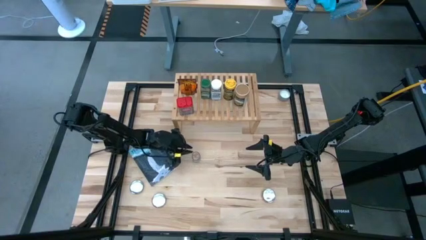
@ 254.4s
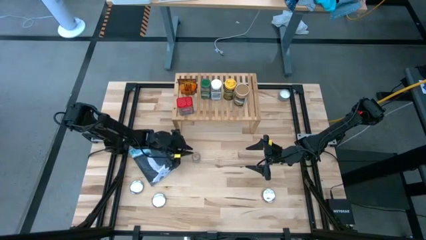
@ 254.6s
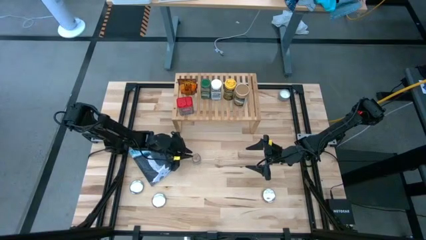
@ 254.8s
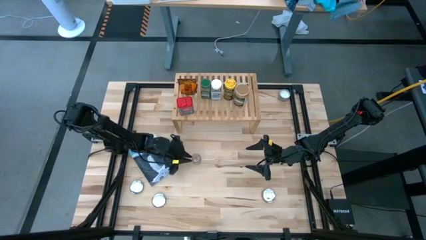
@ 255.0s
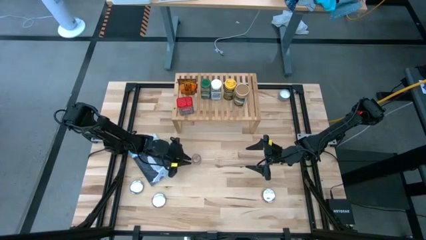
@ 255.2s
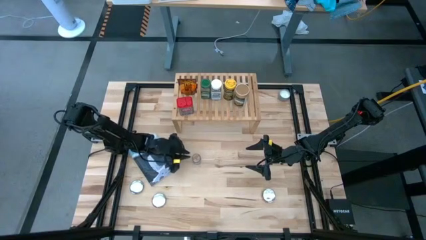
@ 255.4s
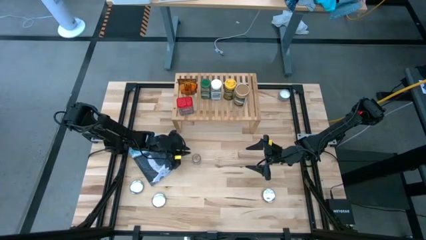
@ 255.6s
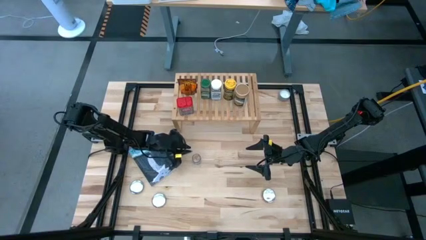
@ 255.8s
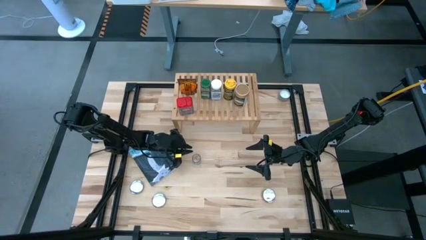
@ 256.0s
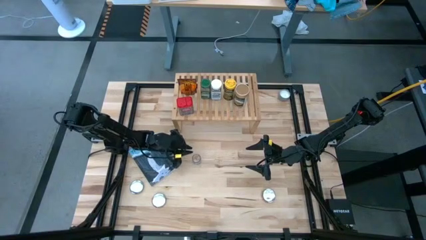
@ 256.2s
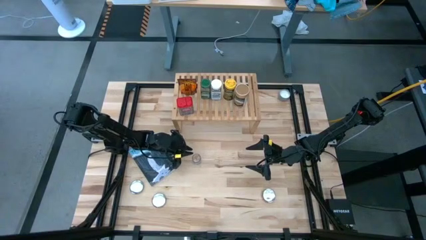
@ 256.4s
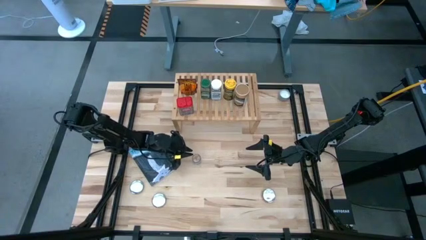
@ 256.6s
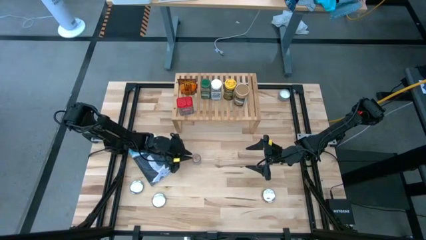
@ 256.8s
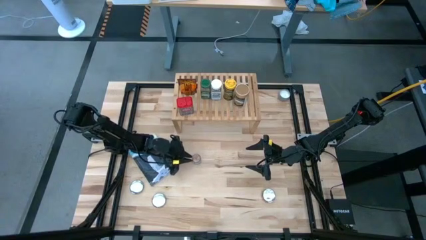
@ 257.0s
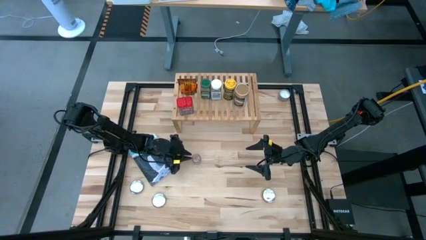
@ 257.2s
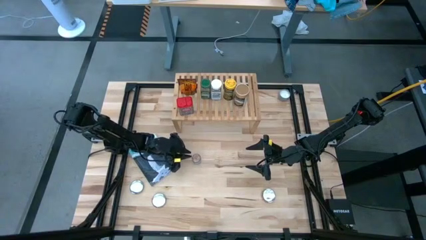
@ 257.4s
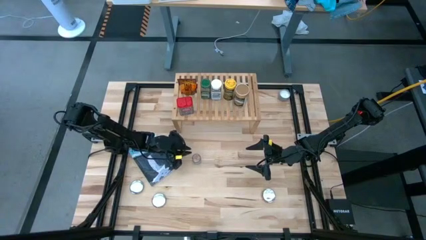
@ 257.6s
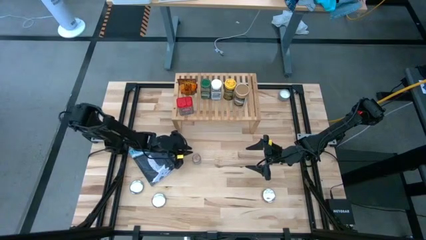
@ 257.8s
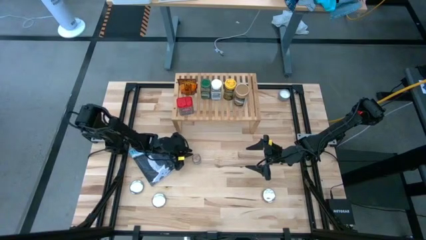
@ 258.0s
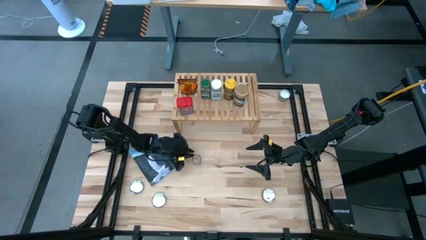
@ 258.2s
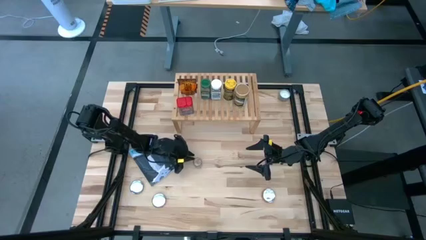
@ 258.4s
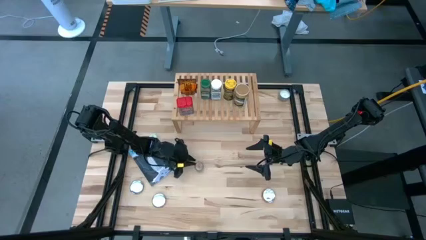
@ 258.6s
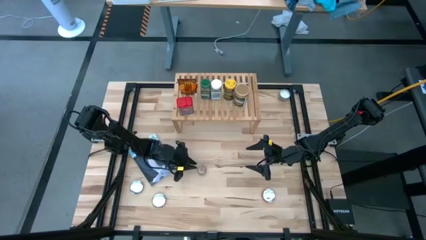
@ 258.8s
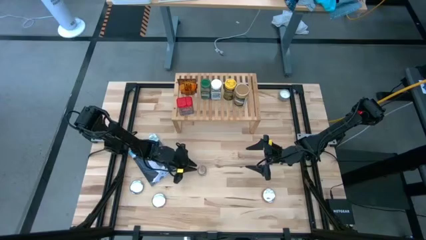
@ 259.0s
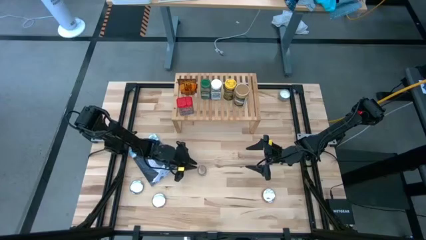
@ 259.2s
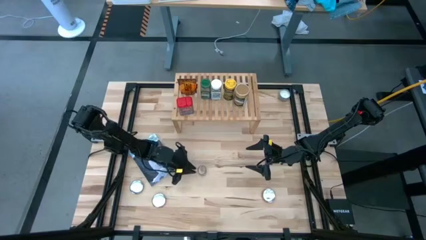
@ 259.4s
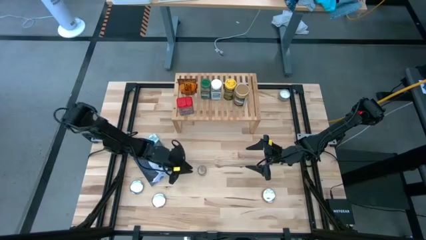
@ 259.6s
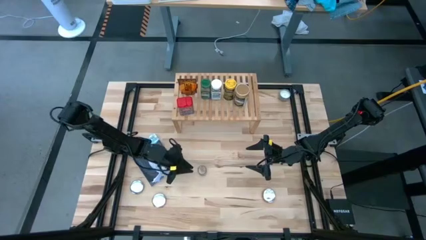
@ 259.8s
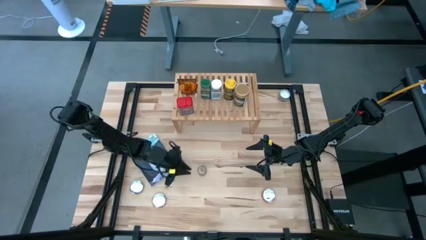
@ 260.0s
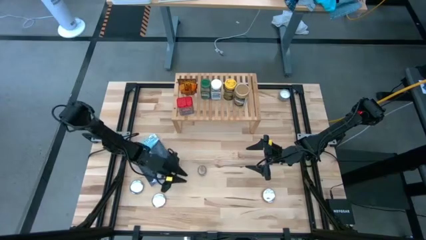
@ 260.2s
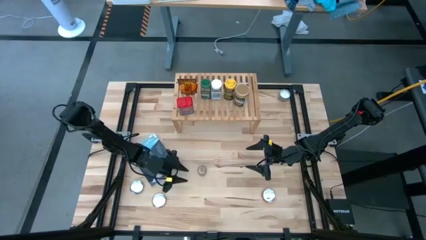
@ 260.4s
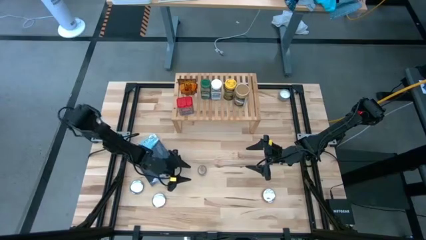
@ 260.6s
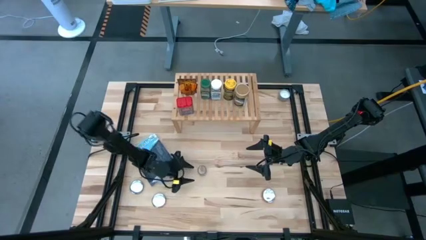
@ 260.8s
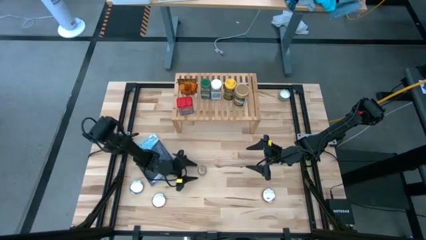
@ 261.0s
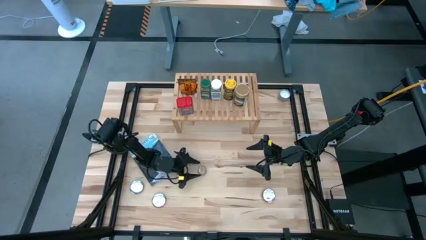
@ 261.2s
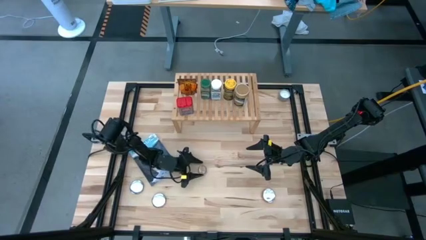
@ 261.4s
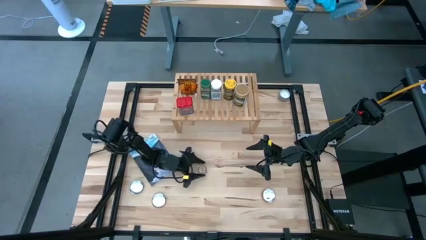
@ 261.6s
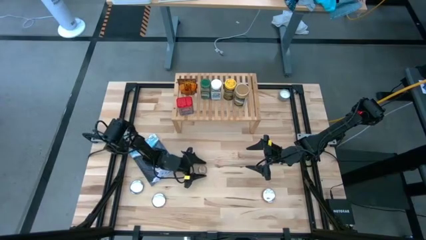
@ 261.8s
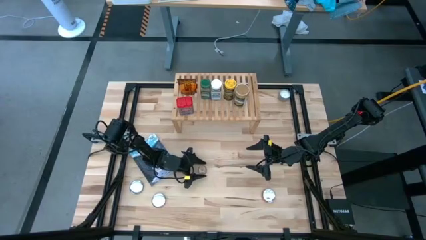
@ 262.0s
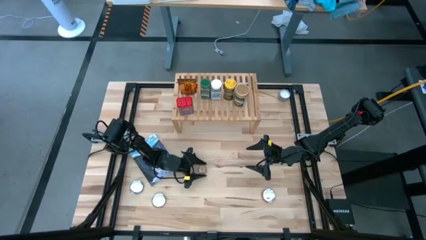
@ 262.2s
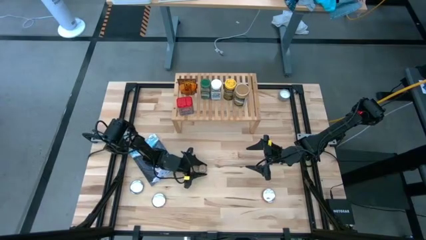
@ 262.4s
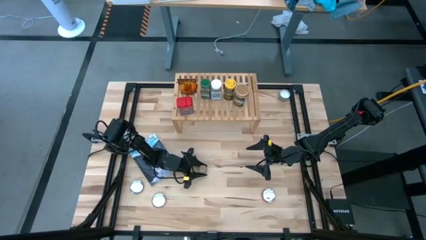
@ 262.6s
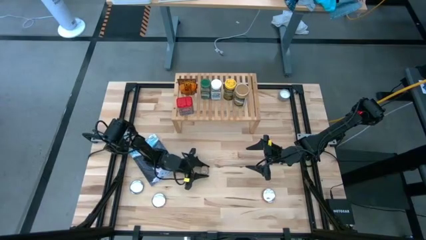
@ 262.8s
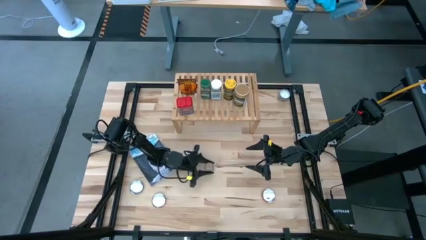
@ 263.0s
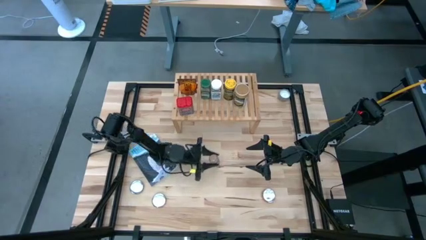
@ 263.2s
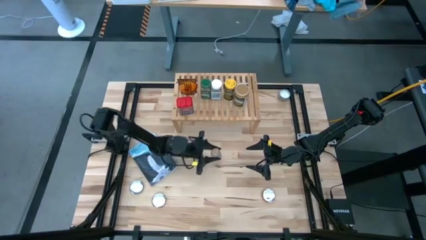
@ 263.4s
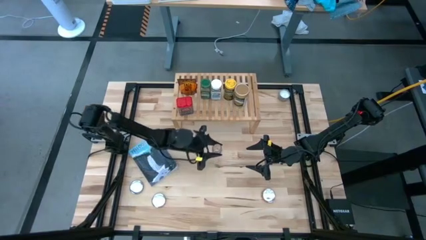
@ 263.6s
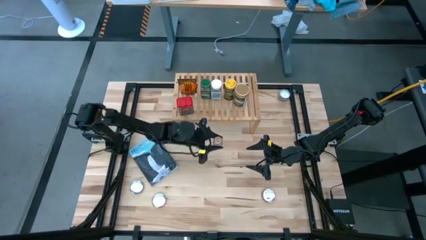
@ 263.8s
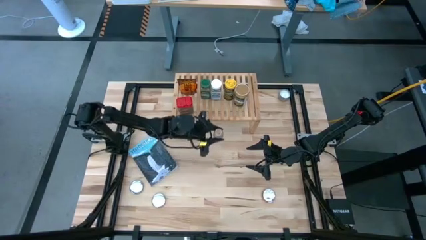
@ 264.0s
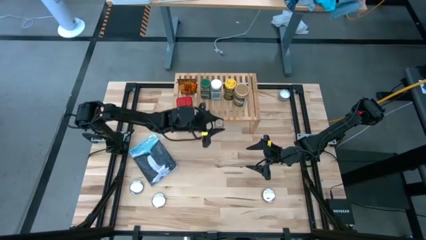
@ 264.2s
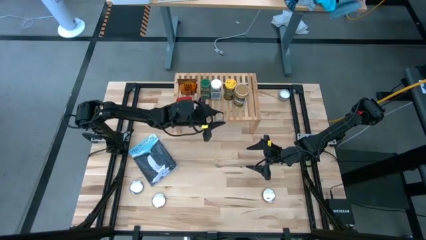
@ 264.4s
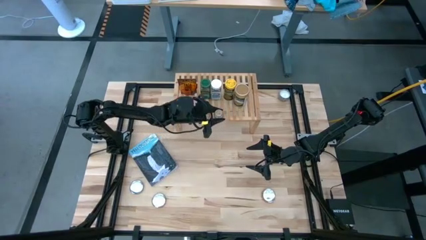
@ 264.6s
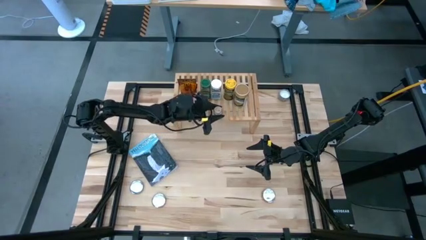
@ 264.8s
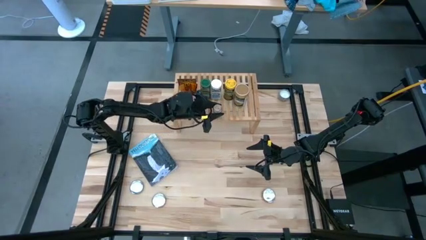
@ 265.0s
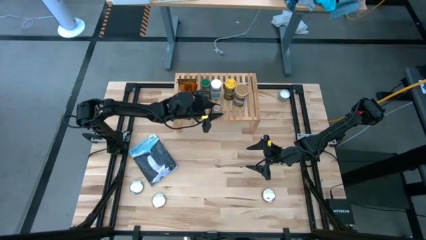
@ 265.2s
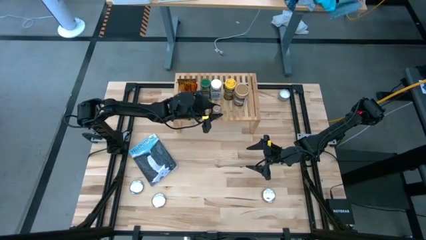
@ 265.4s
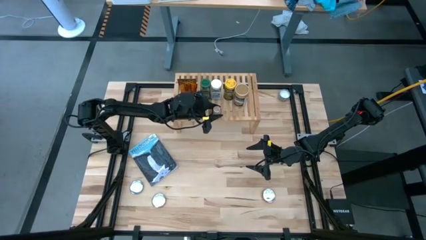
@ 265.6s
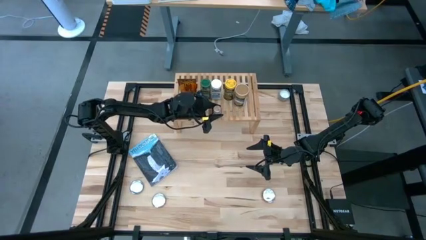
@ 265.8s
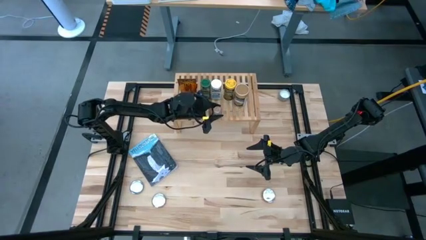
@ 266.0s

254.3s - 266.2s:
Task: Shelf spices
Put the transparent seasoning bottle on the shelf

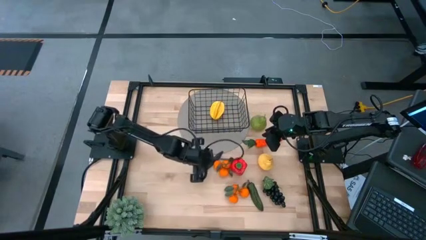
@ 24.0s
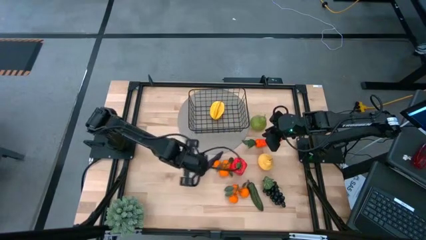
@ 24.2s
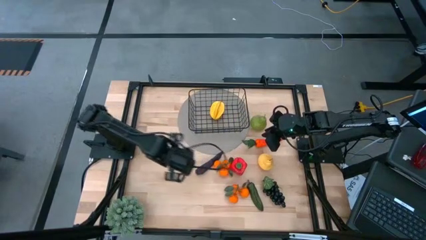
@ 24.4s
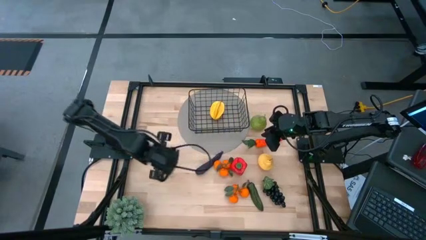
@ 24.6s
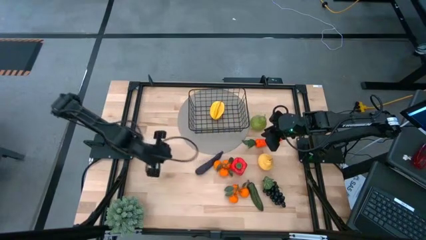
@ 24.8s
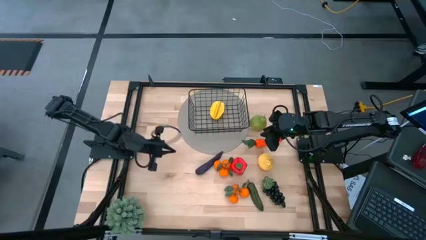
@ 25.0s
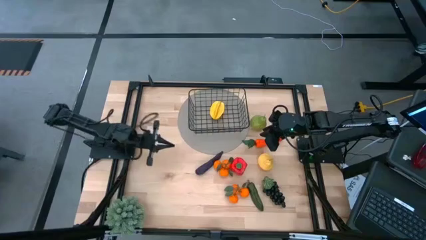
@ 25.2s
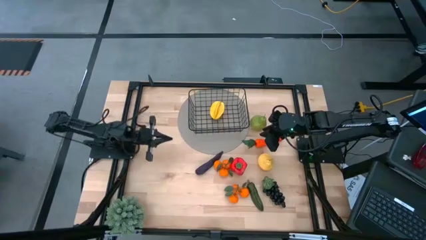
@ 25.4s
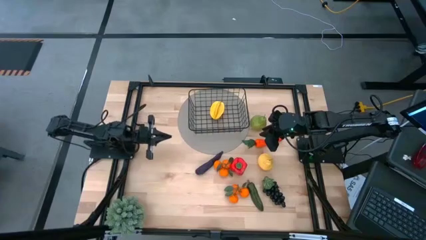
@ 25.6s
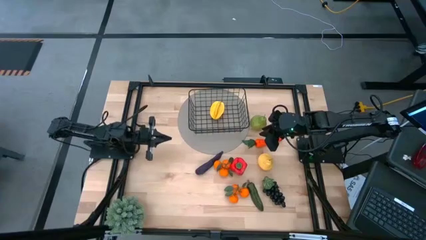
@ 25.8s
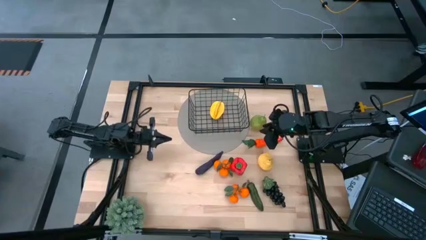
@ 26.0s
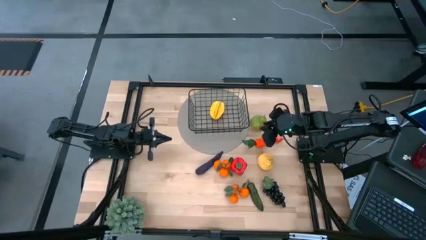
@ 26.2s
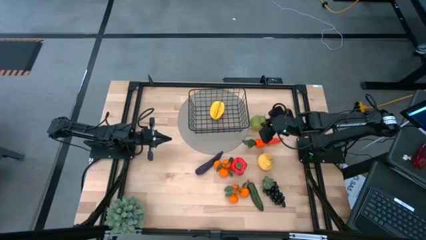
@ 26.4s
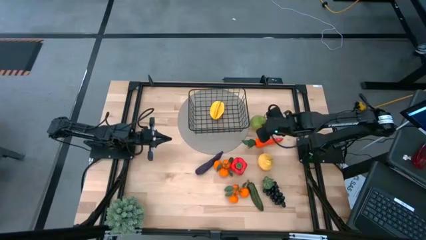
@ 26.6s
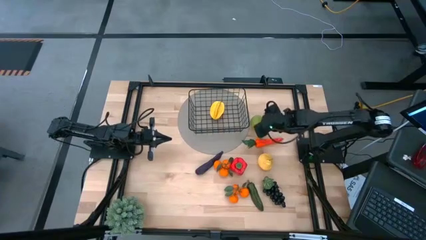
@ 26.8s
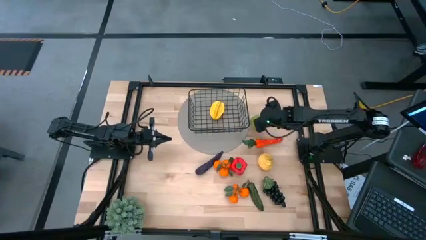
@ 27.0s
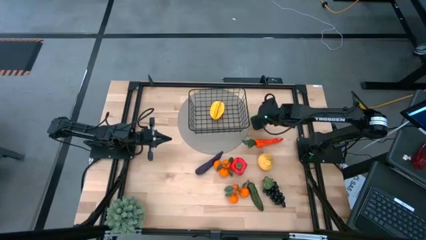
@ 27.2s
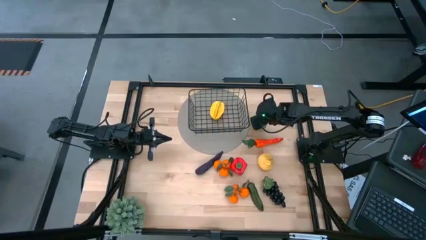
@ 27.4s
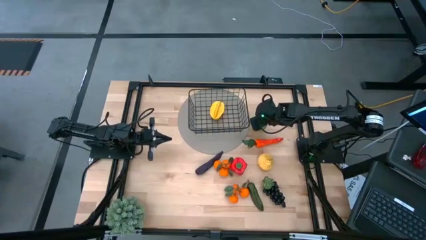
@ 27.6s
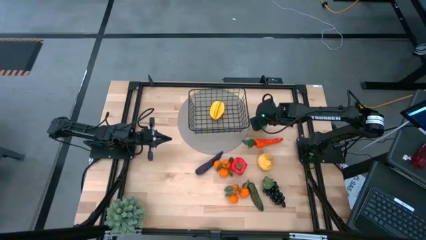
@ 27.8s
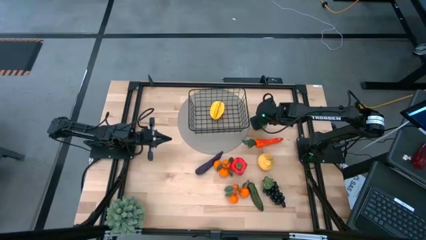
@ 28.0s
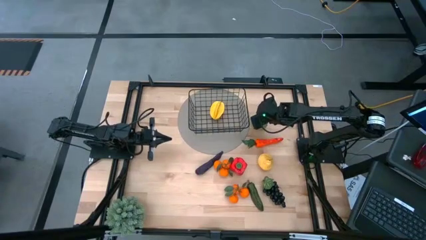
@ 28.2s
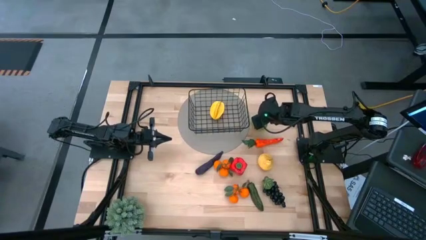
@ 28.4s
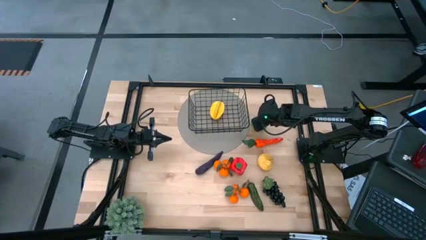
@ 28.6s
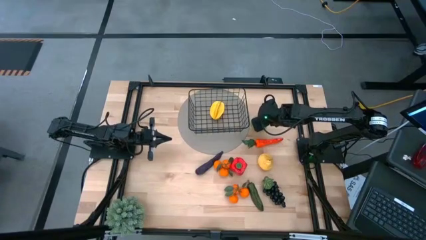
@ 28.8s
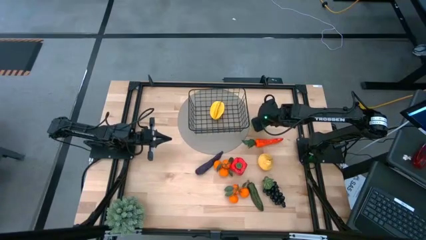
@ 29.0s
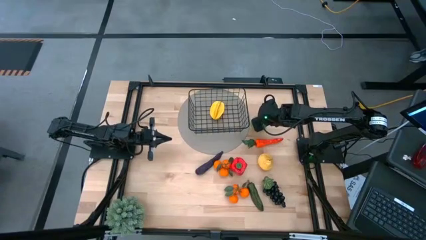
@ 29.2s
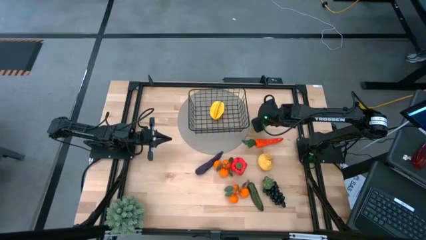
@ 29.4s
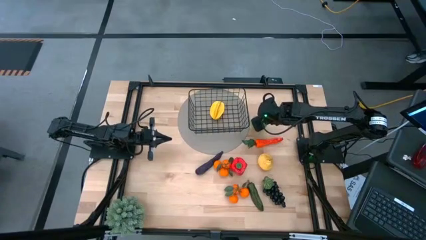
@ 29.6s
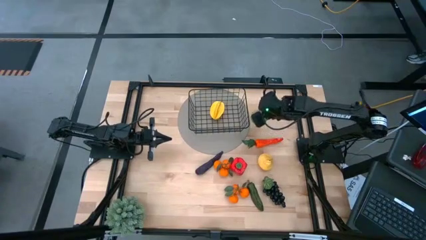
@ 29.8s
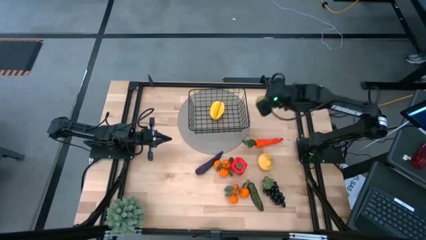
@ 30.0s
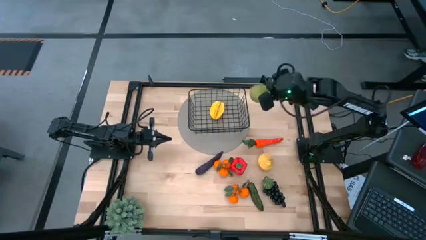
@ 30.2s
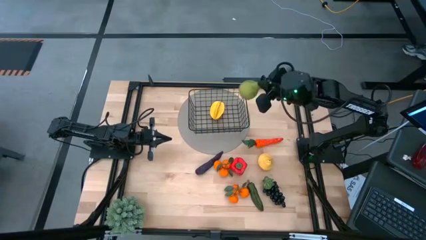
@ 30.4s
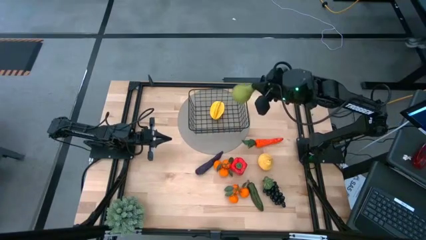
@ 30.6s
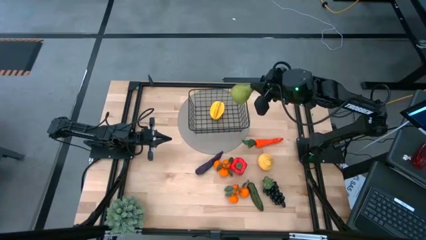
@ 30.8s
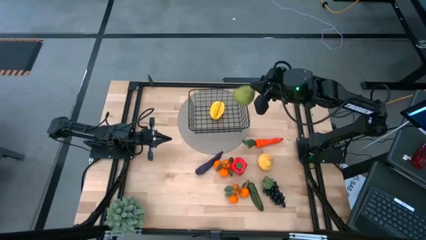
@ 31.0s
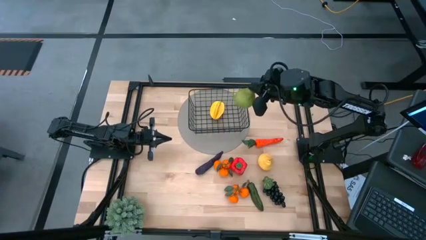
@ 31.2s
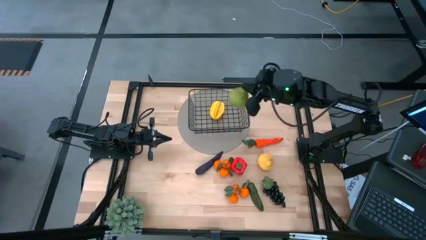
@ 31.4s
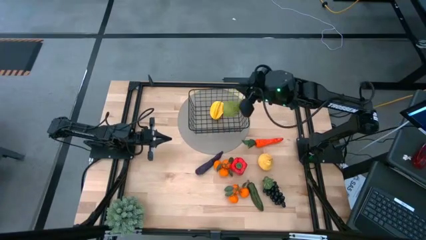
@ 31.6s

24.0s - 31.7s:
Task: Build produce basket
Put the green pear into the black wire basket
